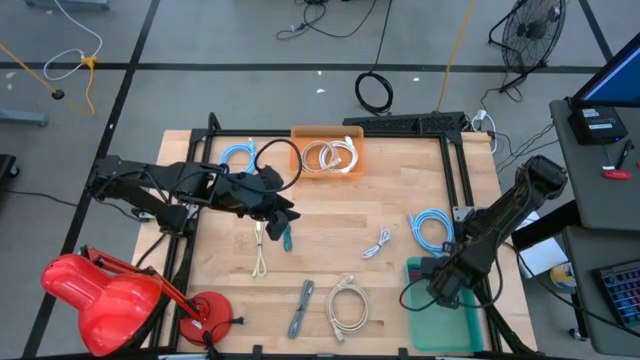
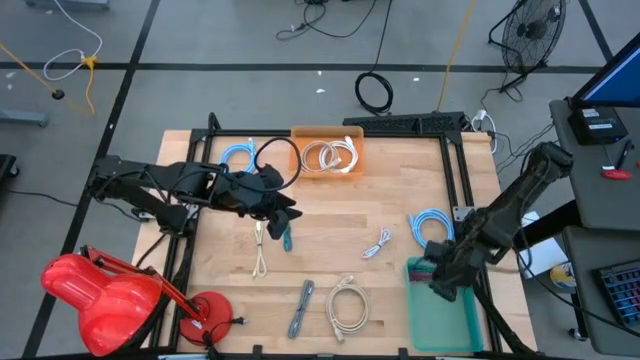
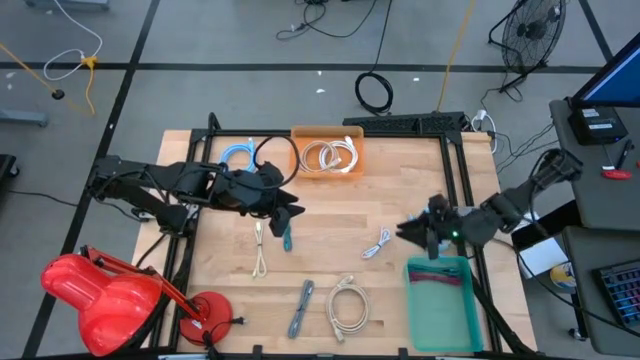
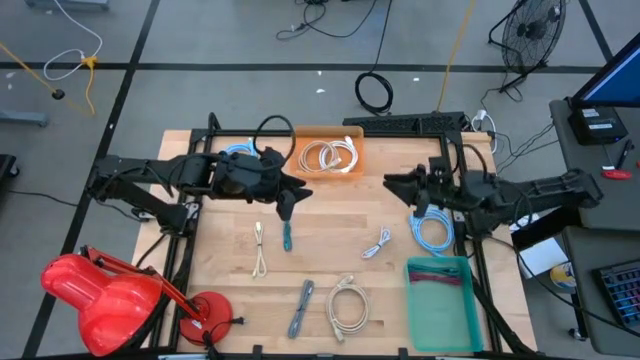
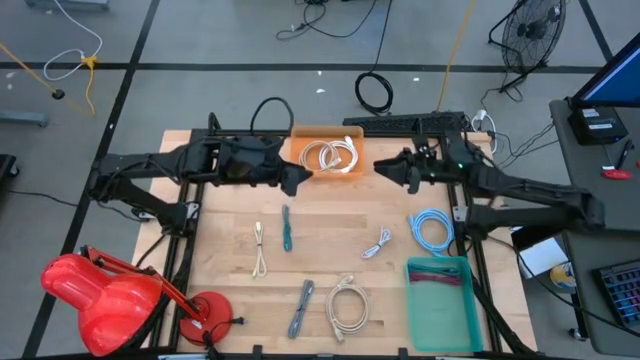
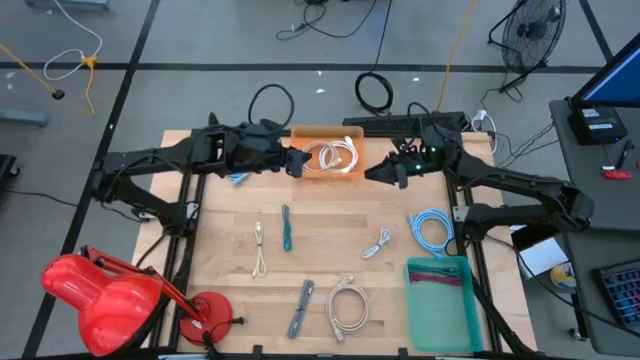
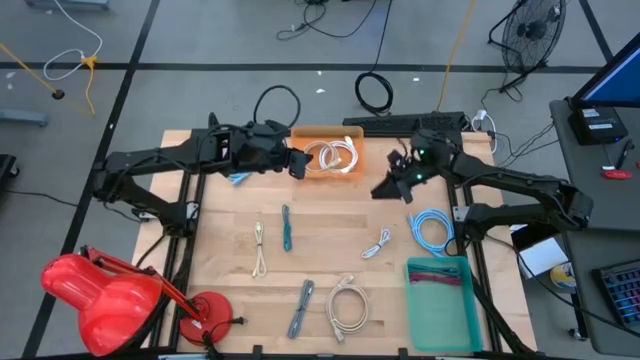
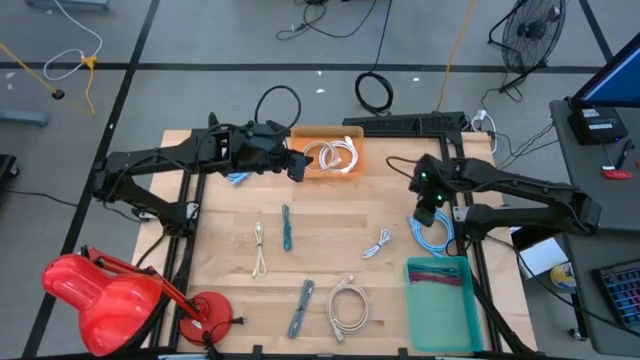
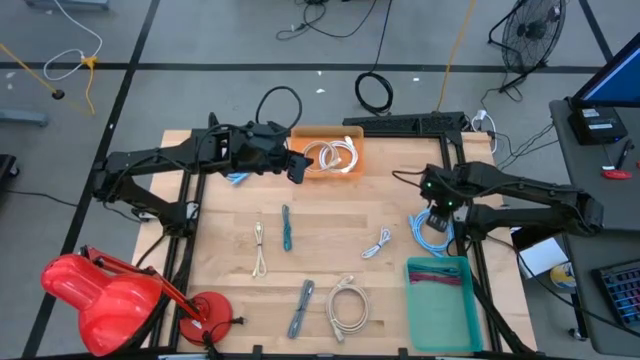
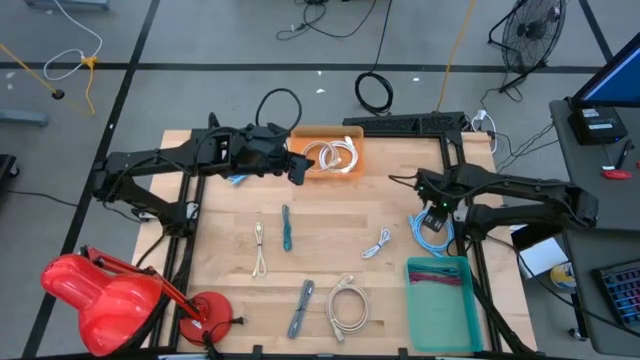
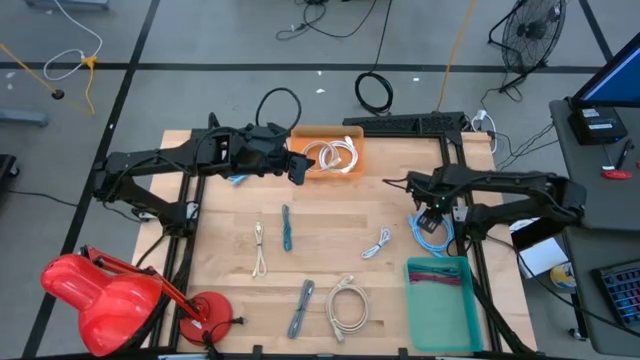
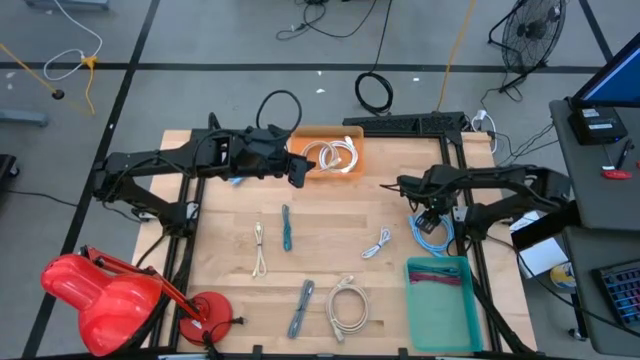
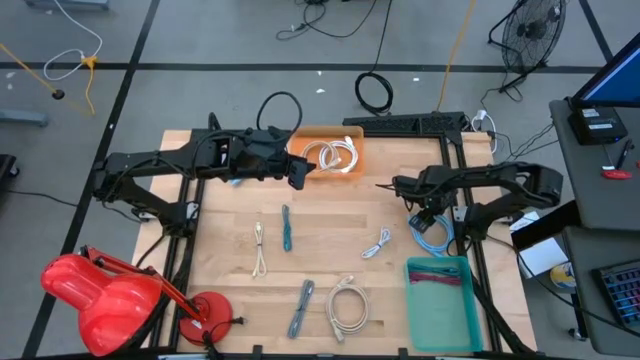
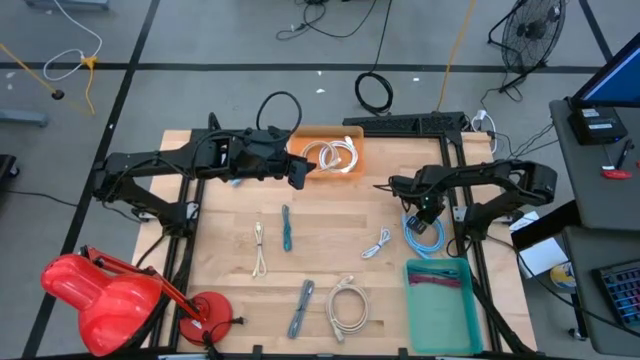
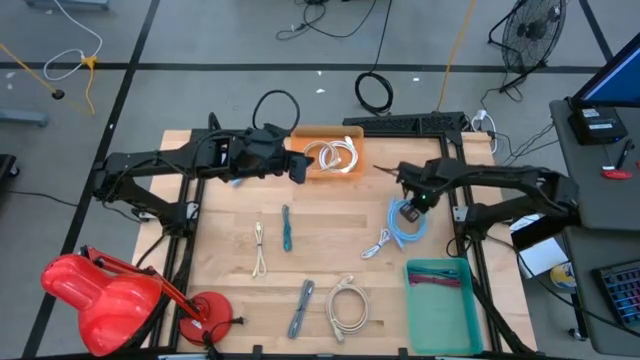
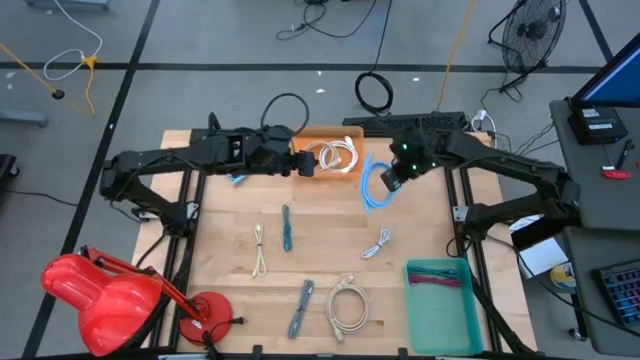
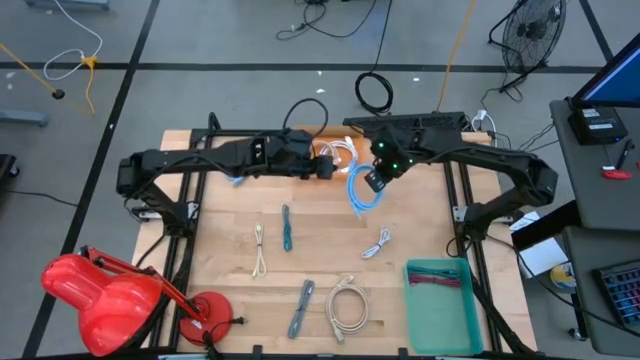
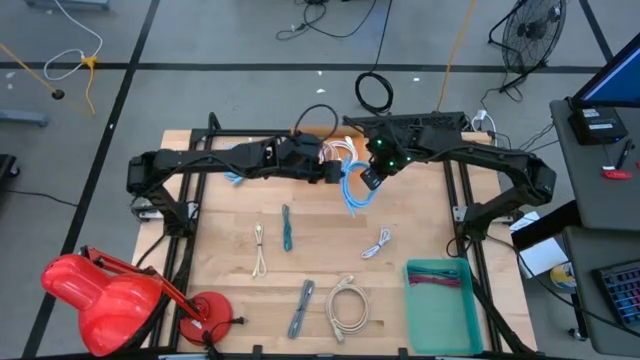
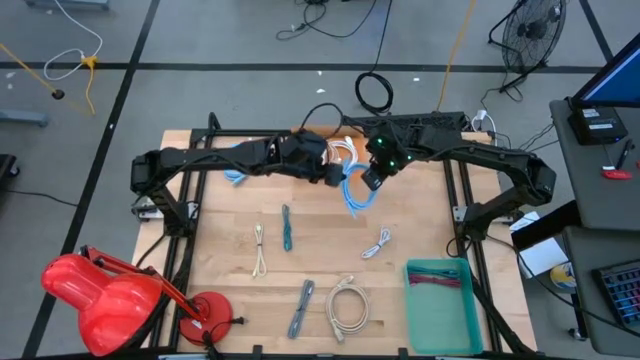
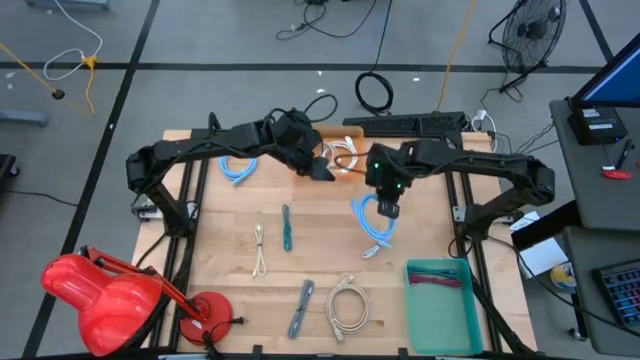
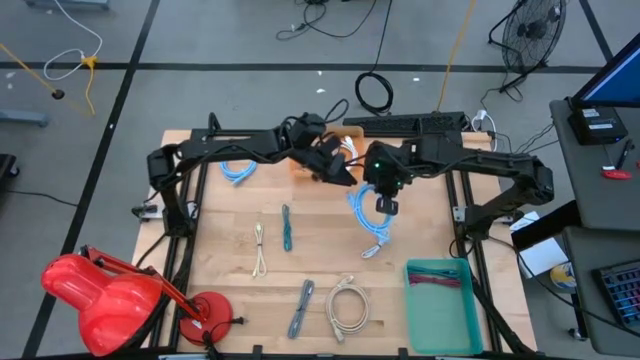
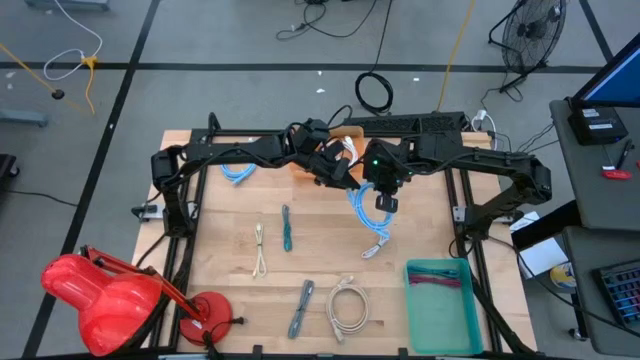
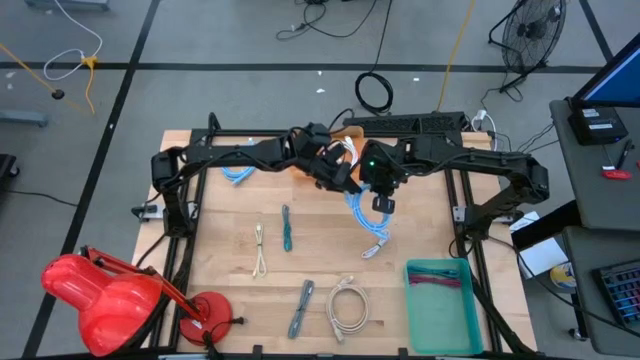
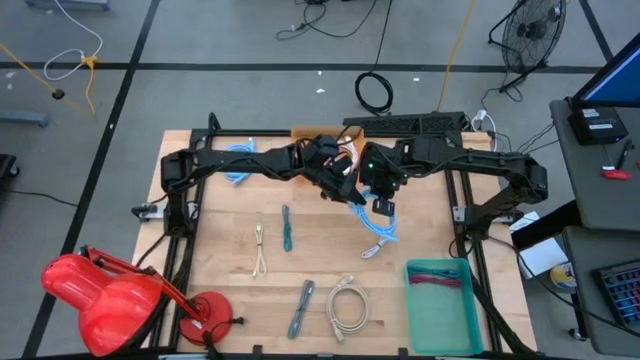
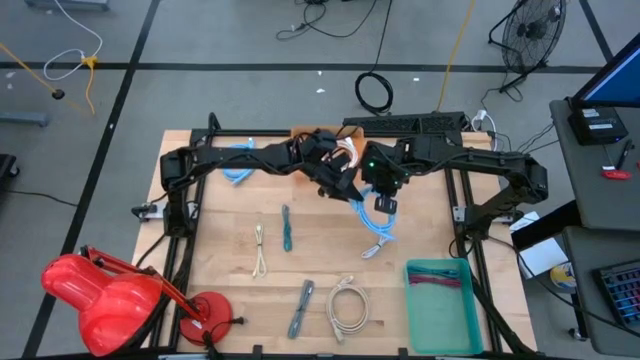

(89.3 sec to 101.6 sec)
Task: Pick & Place USB Port
Put the large bottom blue charger cable into the orange bin

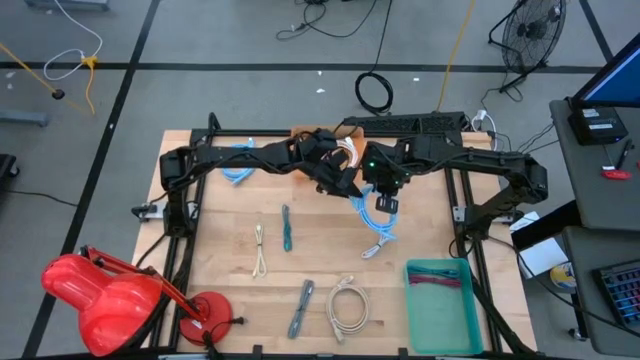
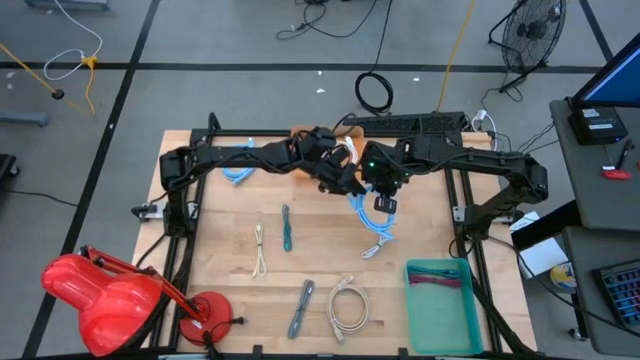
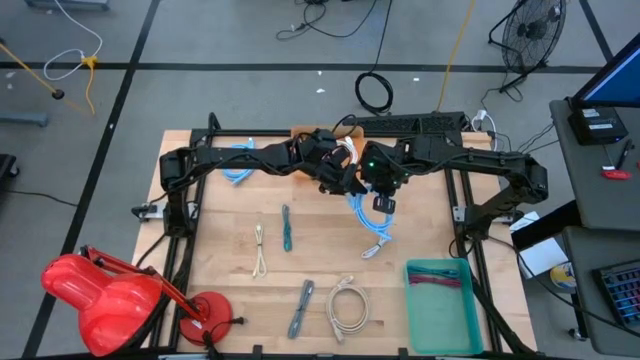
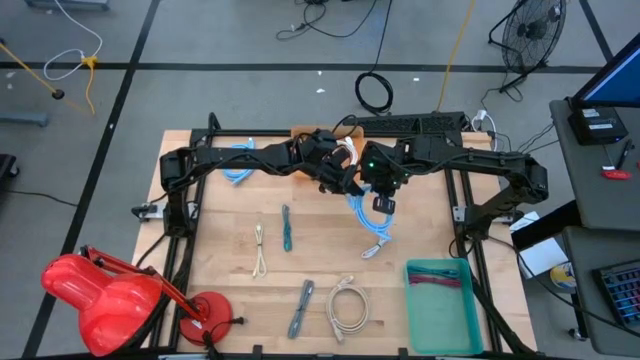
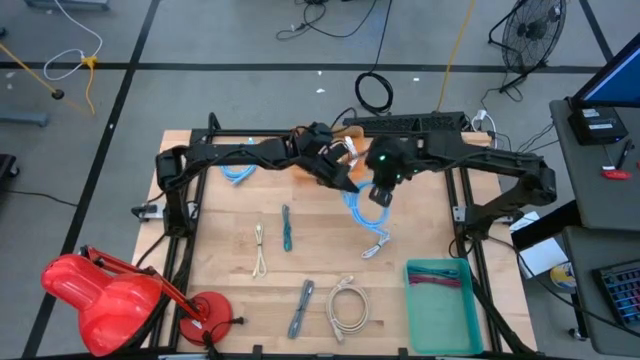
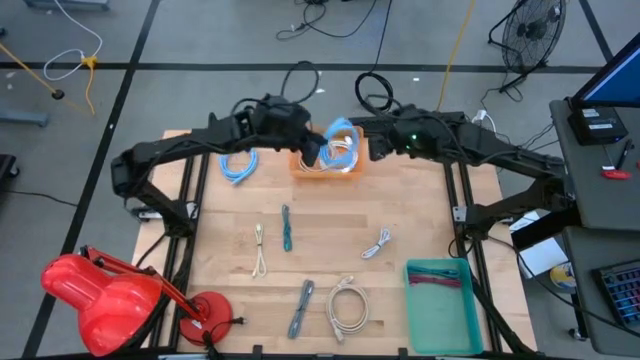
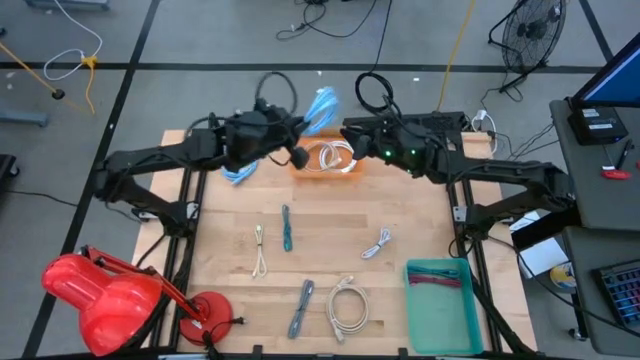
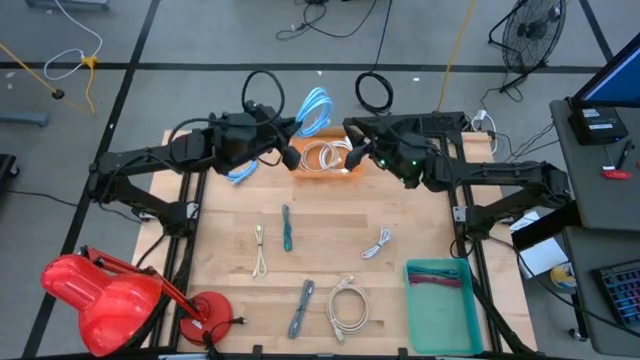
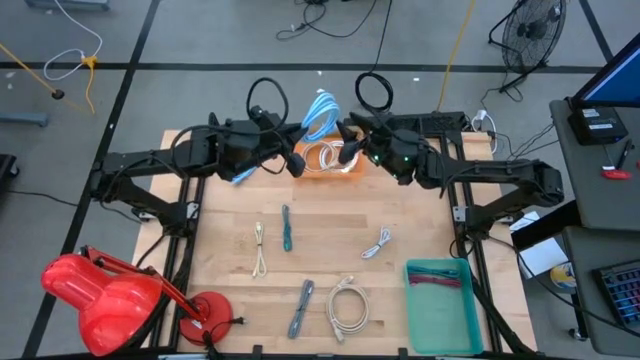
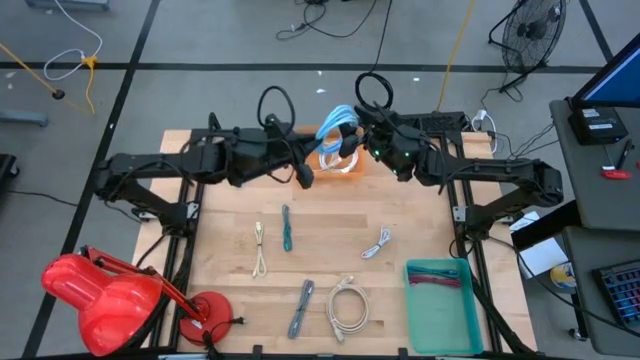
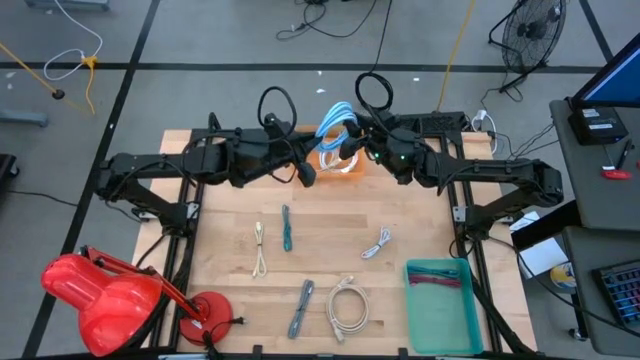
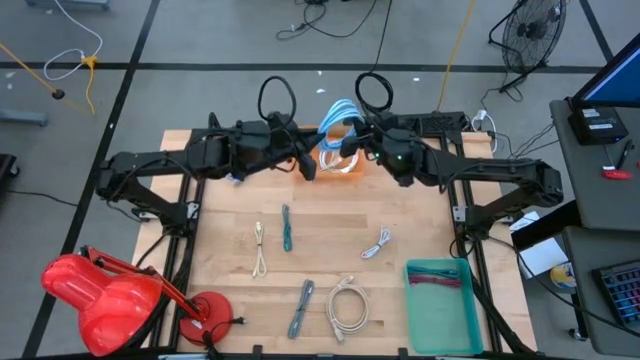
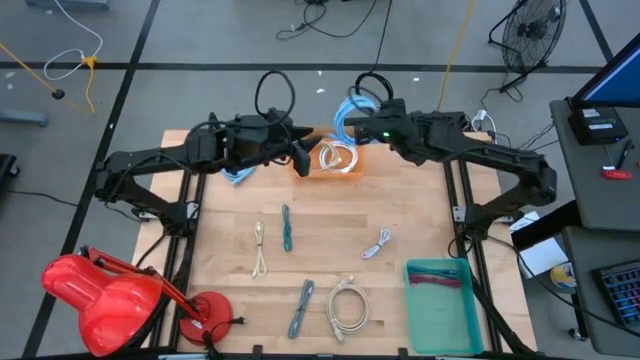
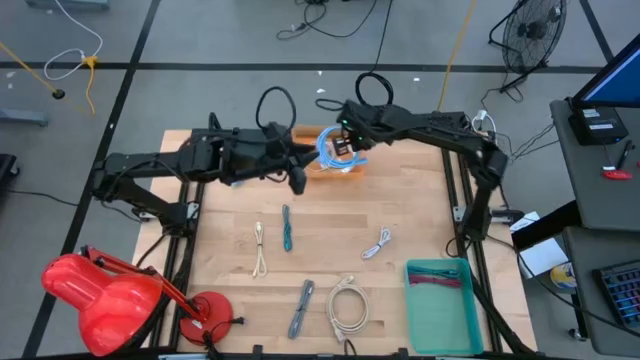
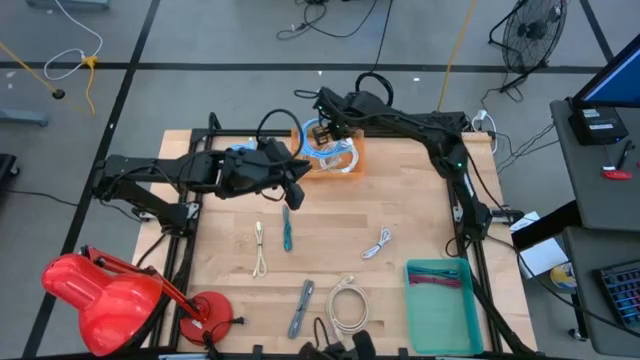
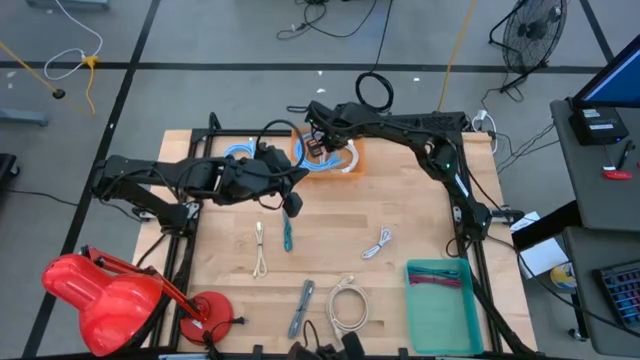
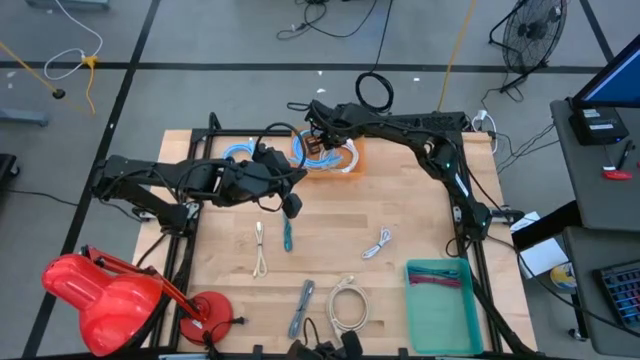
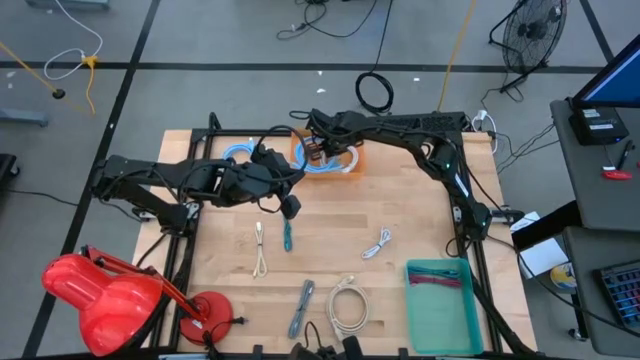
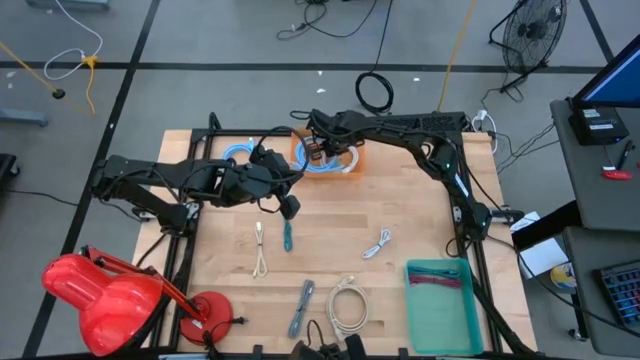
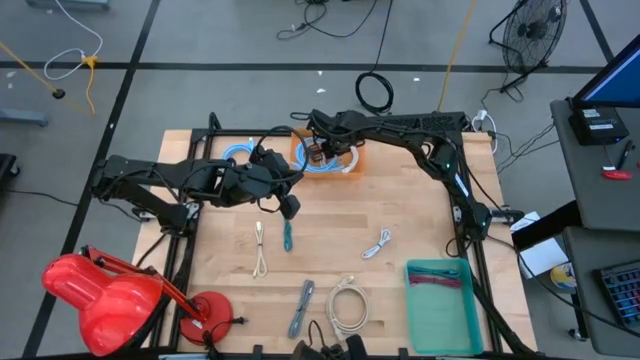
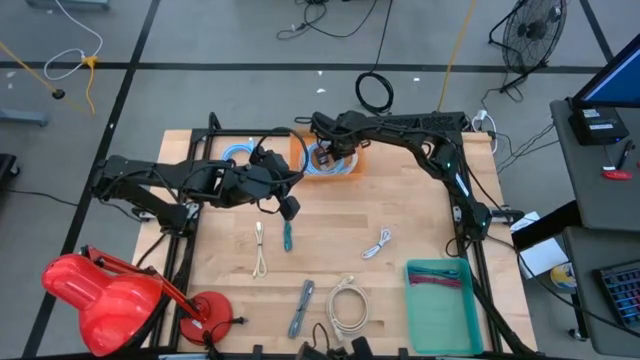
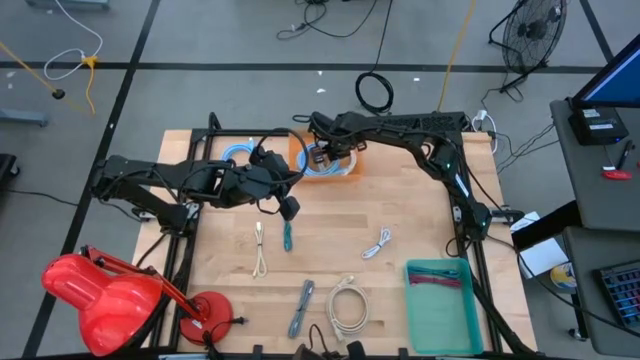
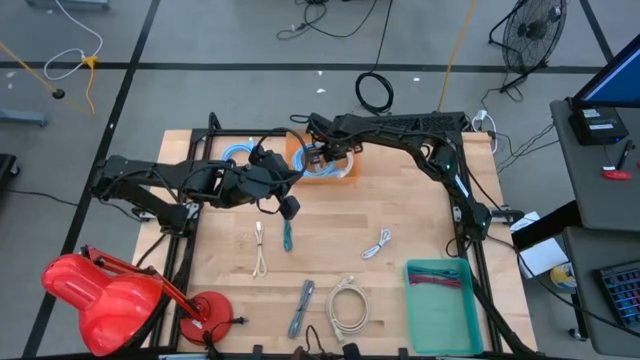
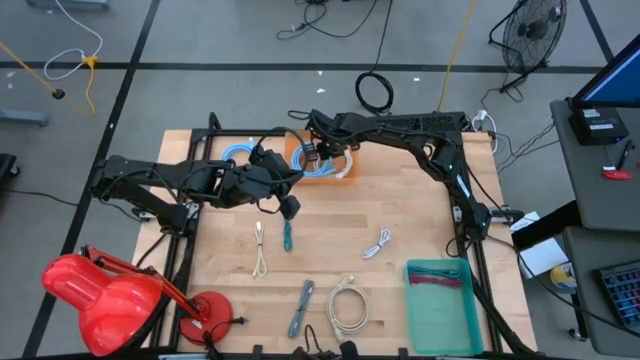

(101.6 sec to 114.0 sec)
Put the large bottom blue charger cable into the orange bin
